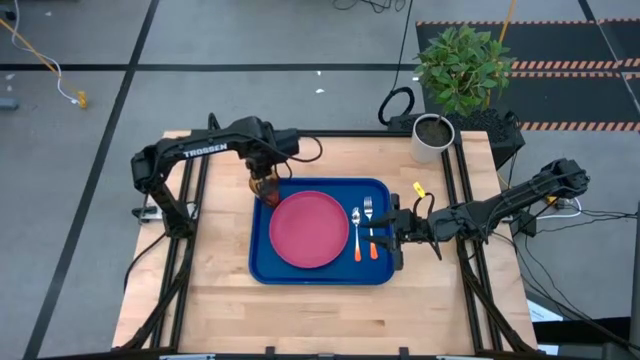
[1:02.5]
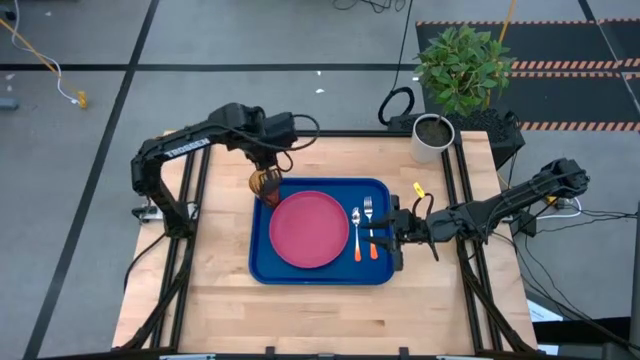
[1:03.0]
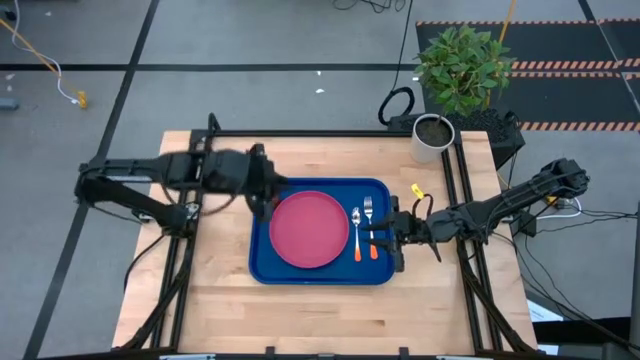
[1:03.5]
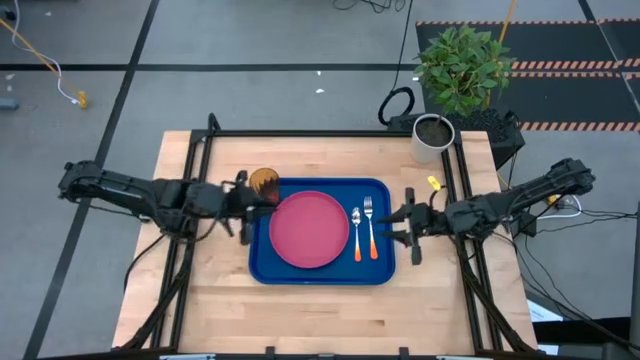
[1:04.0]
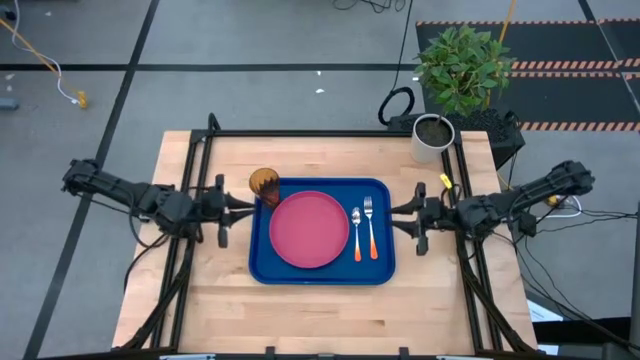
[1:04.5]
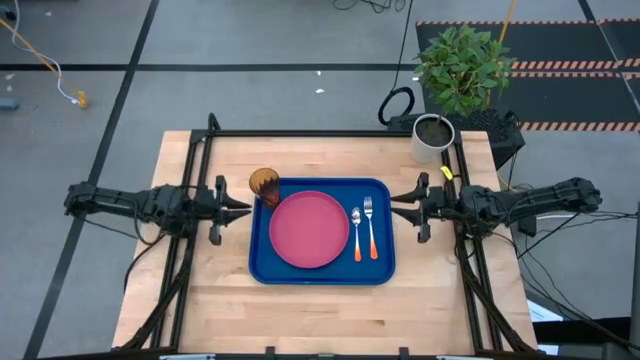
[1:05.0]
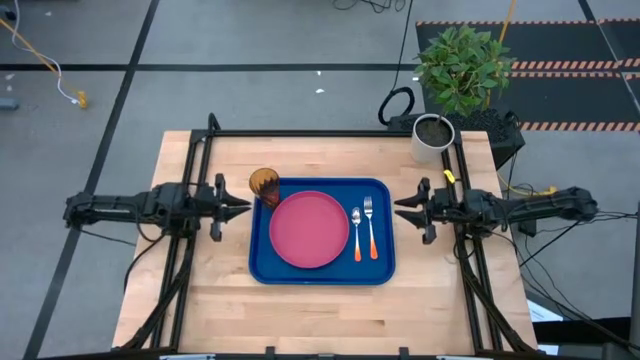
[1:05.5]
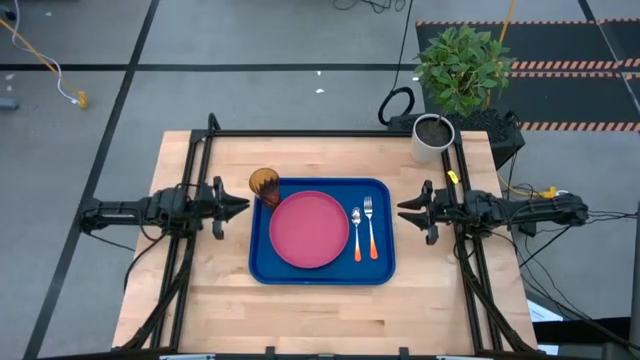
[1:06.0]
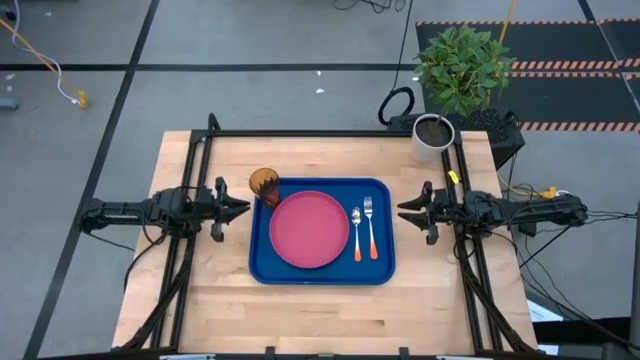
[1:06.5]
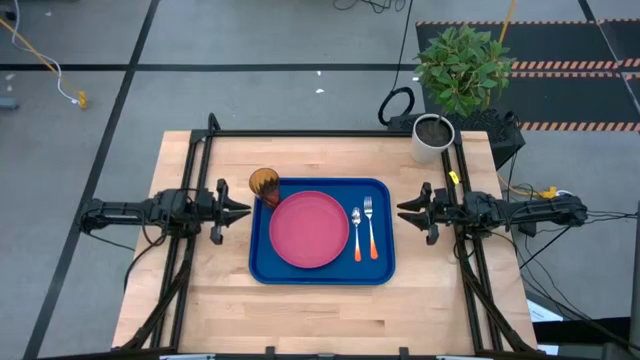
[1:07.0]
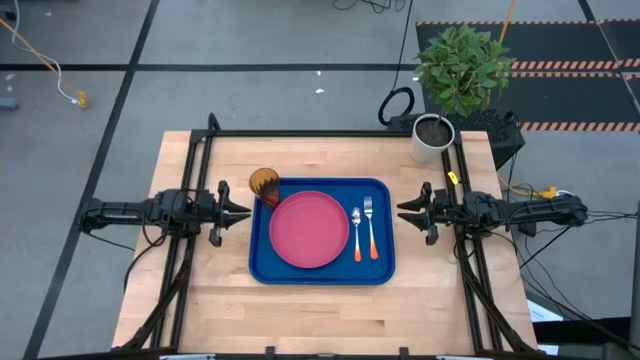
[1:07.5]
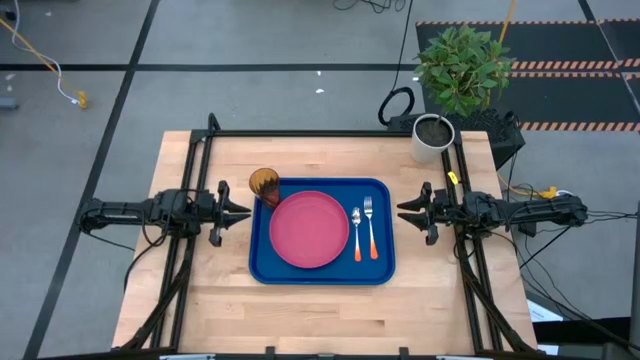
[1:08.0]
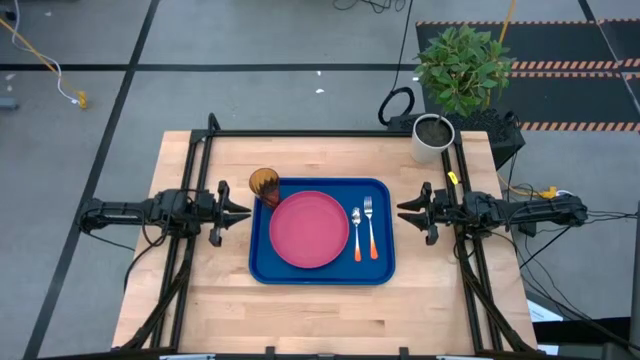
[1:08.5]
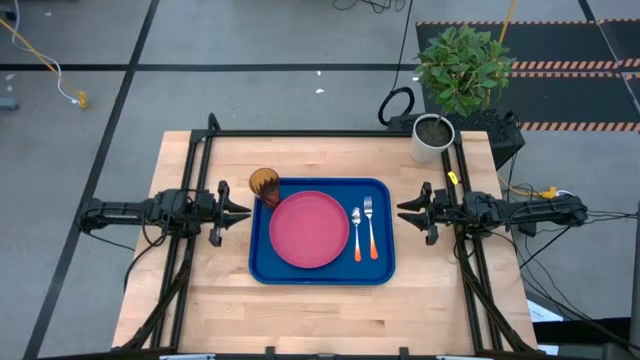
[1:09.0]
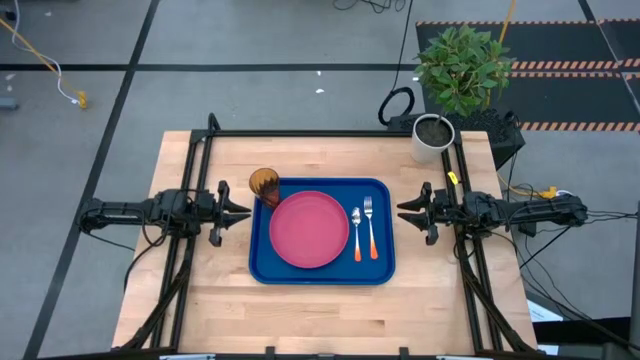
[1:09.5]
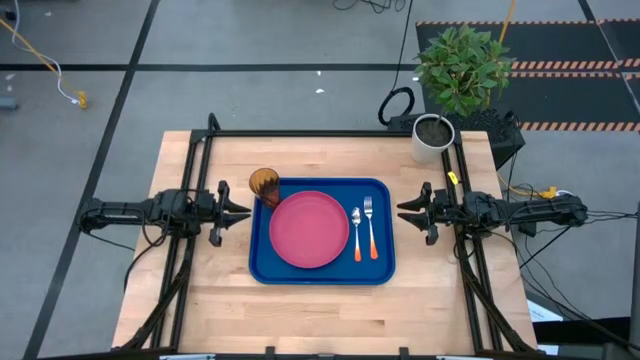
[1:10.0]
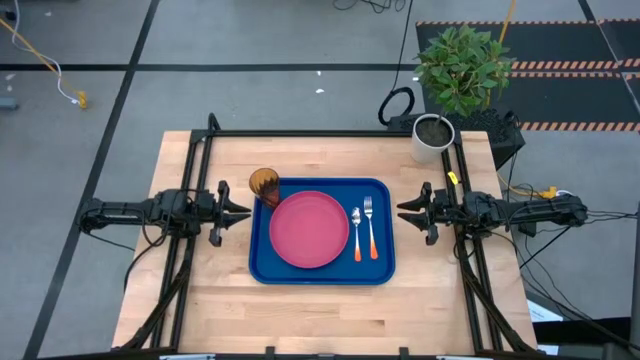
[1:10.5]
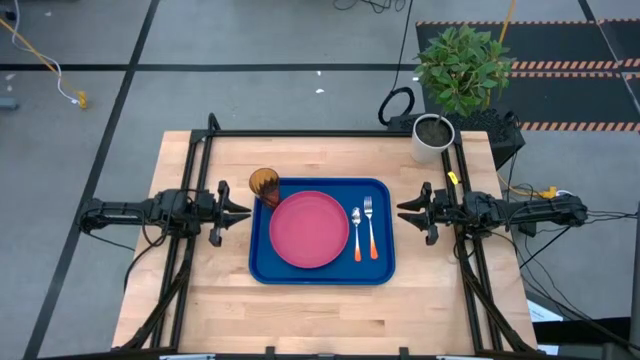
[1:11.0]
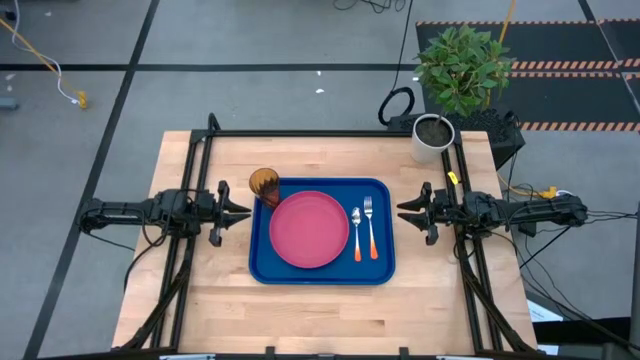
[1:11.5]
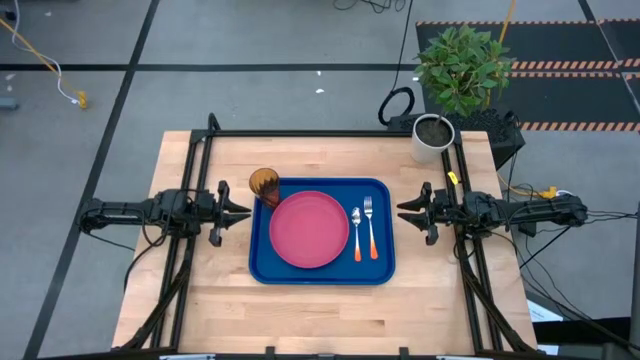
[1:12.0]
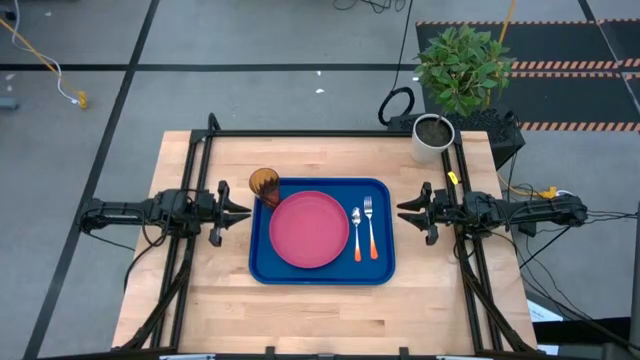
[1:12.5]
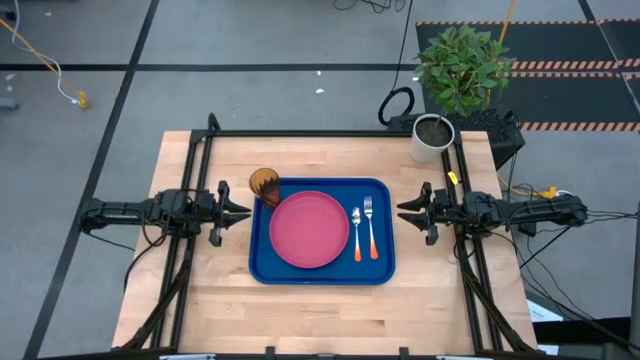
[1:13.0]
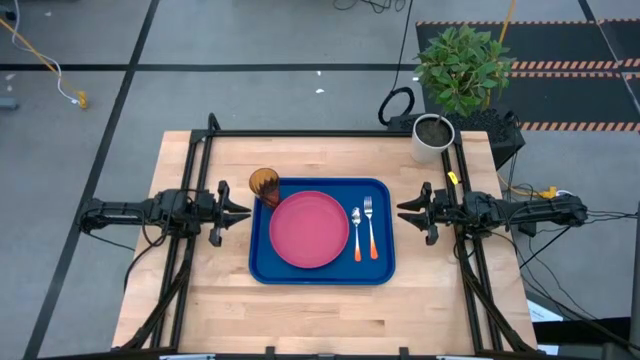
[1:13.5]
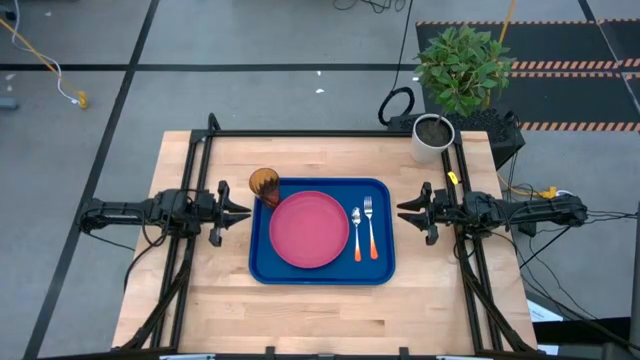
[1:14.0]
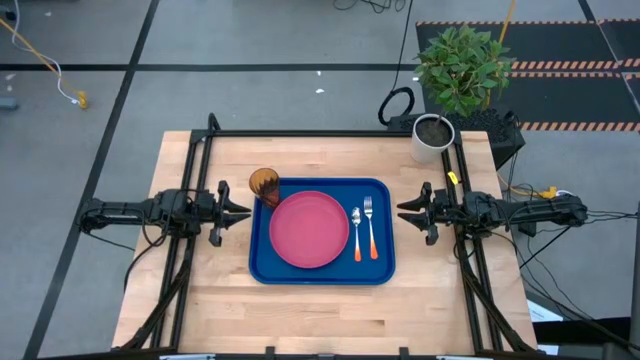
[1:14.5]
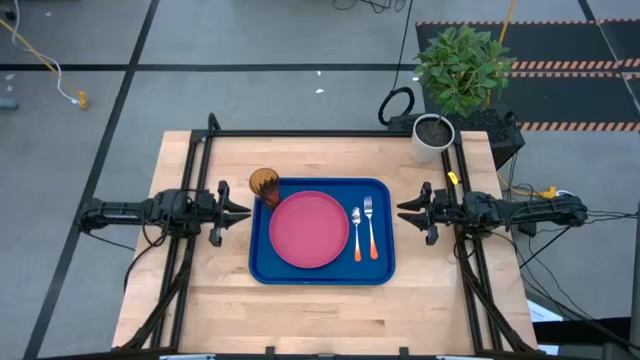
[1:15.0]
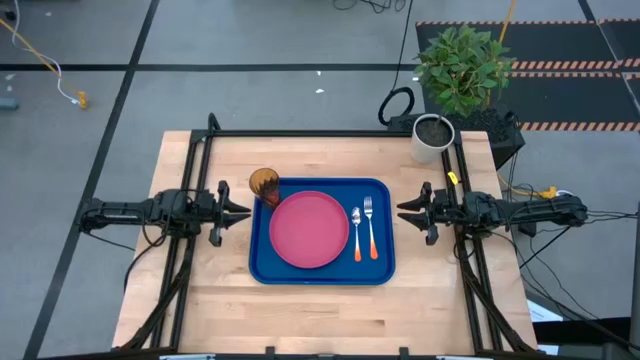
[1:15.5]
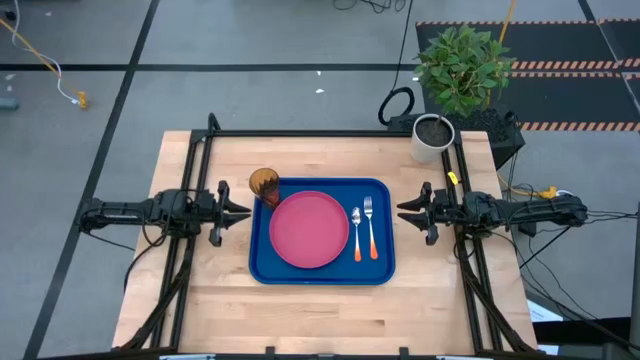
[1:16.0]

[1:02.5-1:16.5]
Task: Pick and place plate/cup/fork/spoon on tray
Return to Home Position

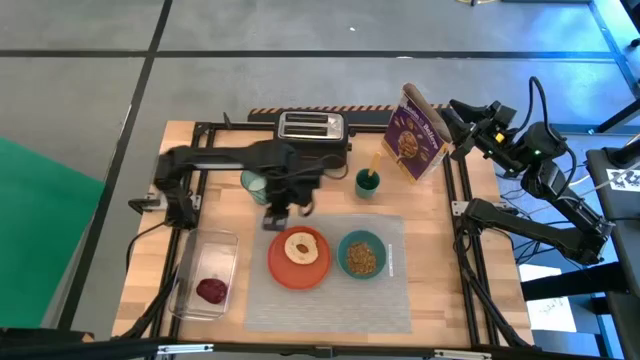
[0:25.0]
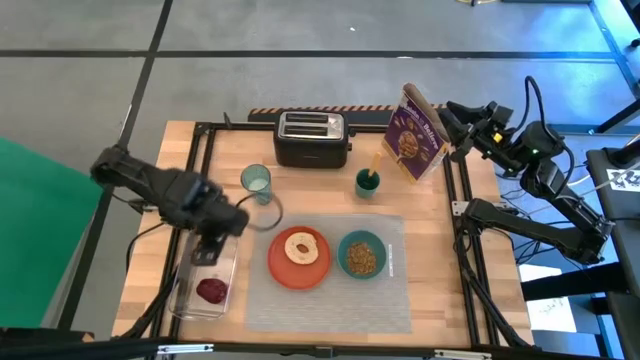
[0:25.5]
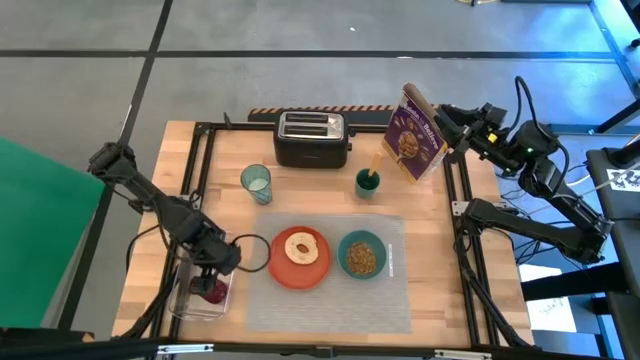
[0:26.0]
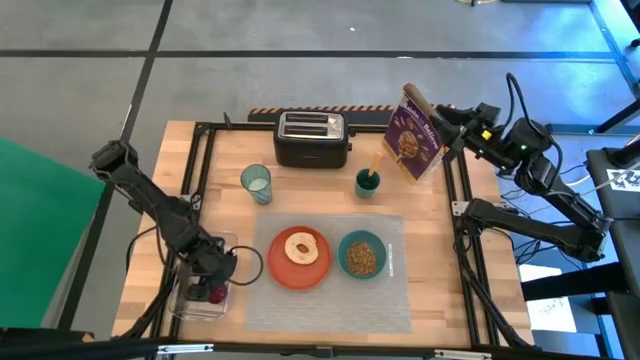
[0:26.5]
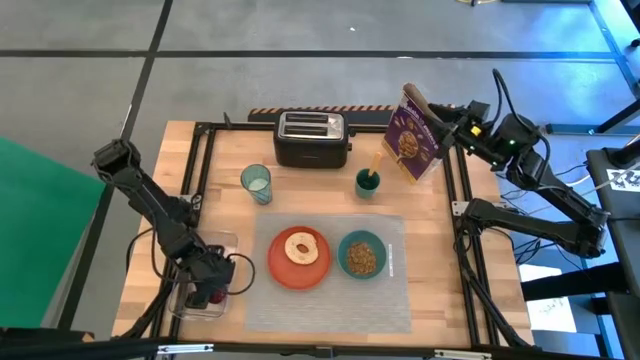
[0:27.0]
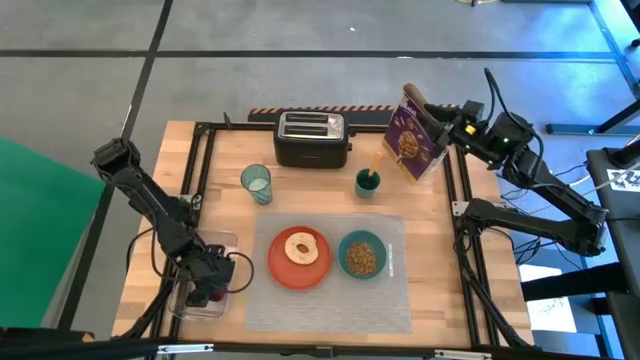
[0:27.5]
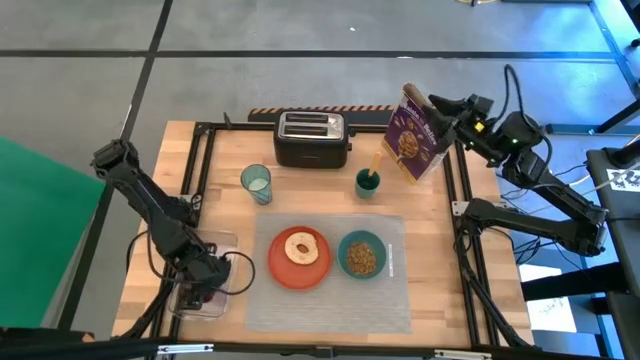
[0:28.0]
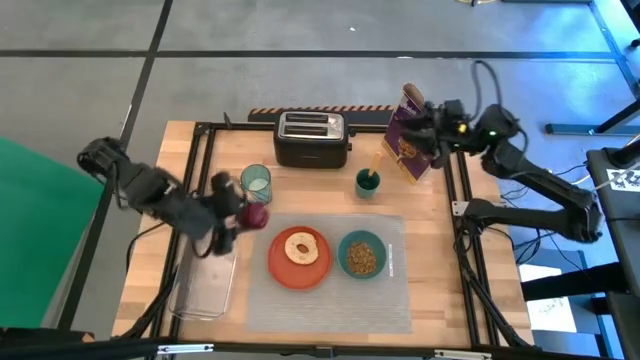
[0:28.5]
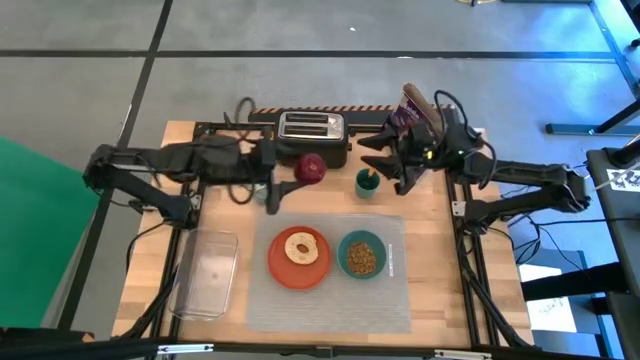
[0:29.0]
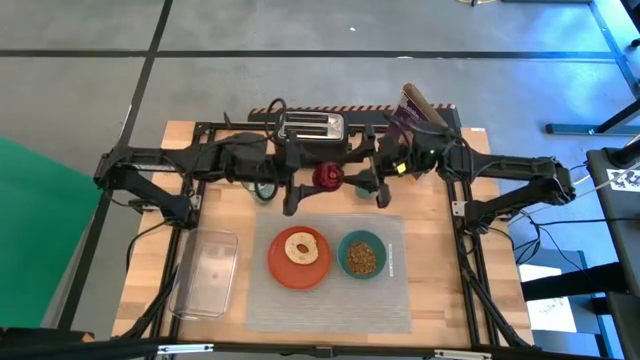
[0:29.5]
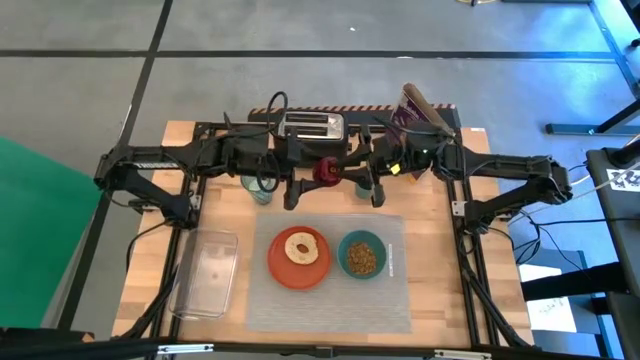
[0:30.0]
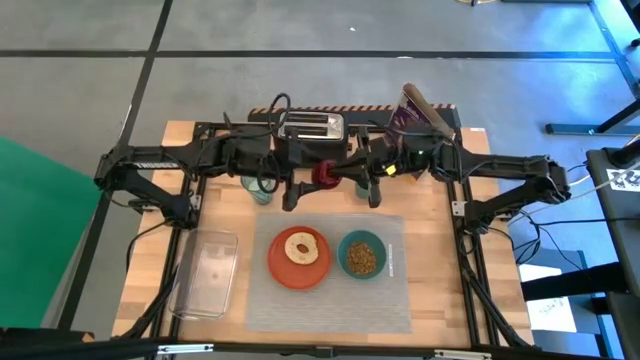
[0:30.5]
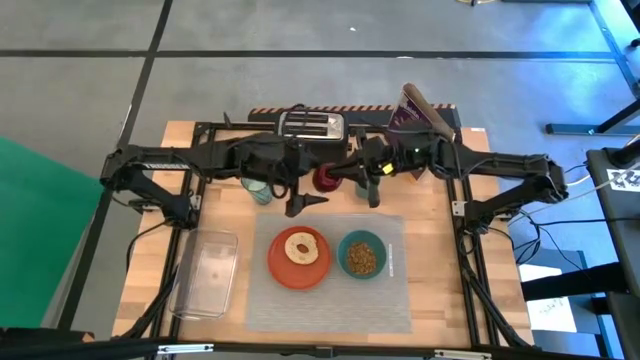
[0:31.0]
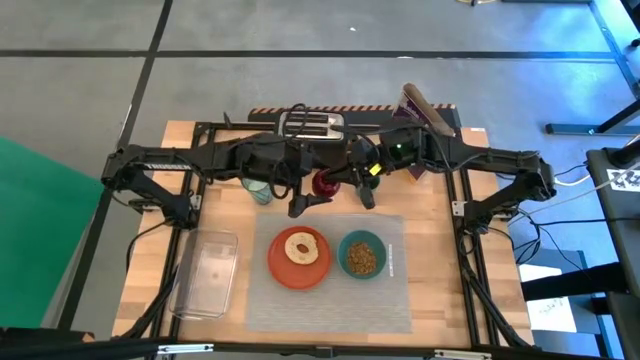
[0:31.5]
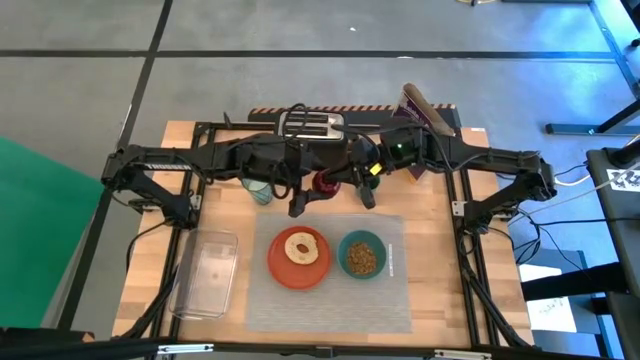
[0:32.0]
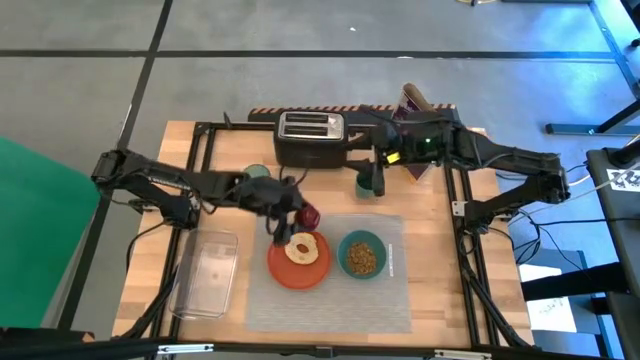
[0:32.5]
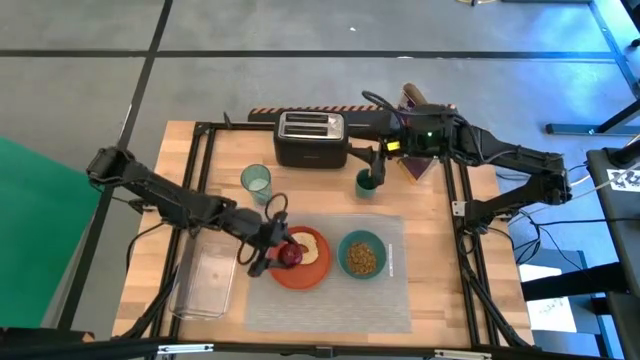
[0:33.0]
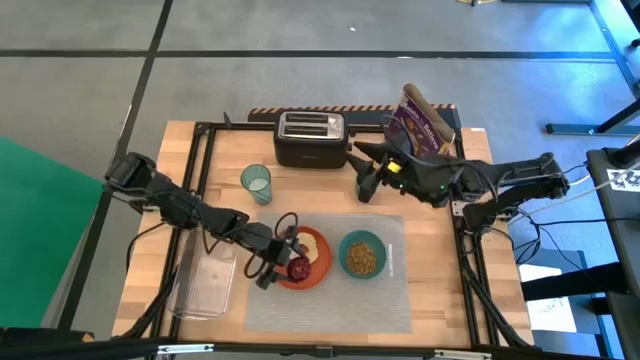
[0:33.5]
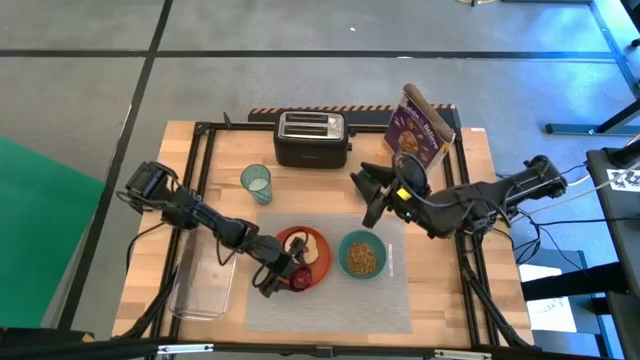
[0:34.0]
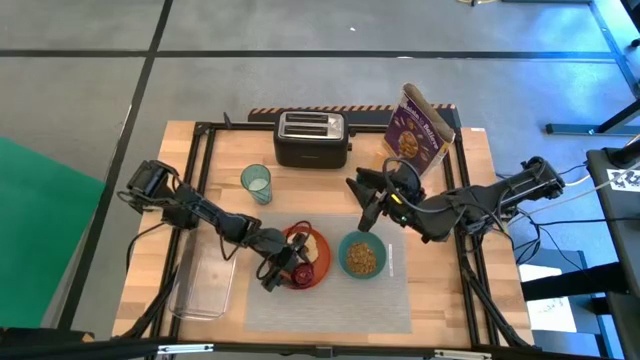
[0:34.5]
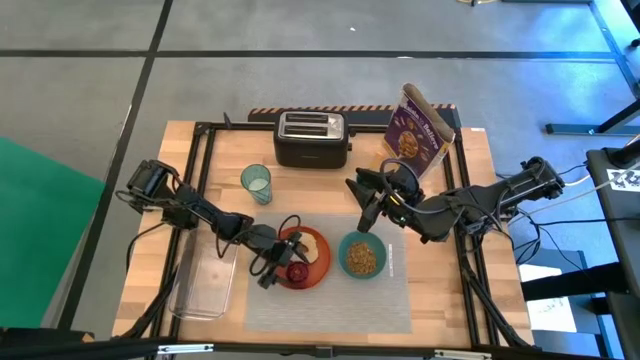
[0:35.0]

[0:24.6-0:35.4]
Task: Arrange a breakfast setting
Put the apple on the orange plate
